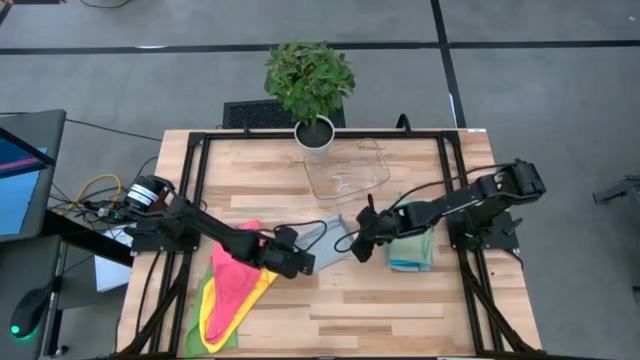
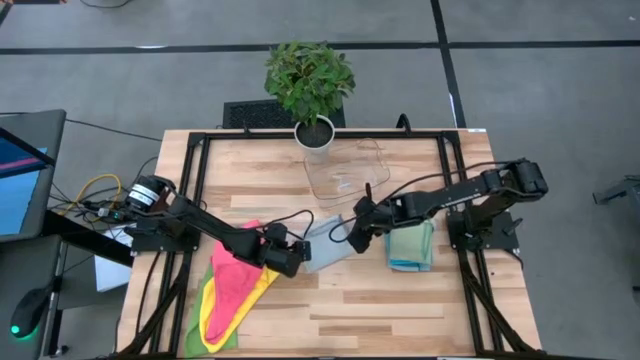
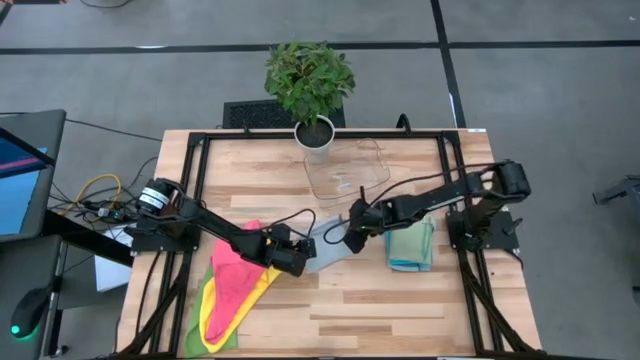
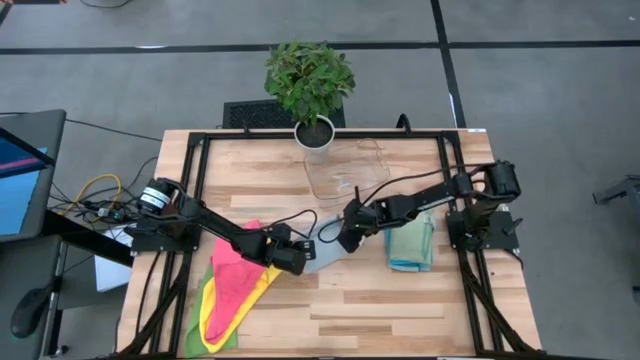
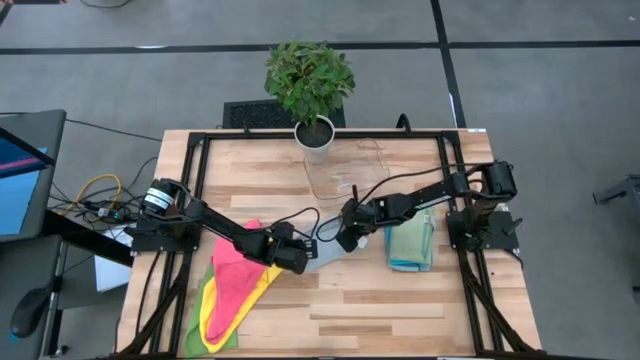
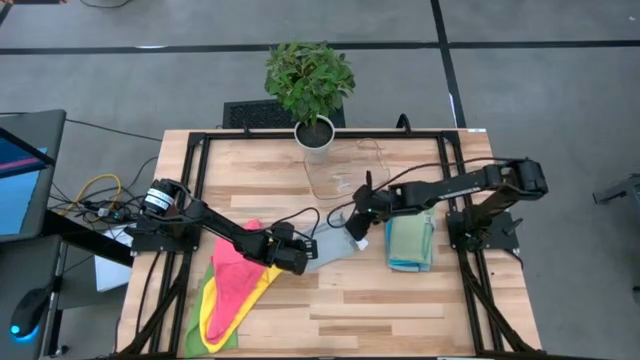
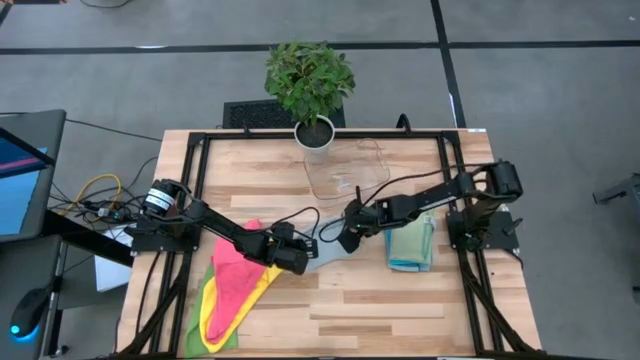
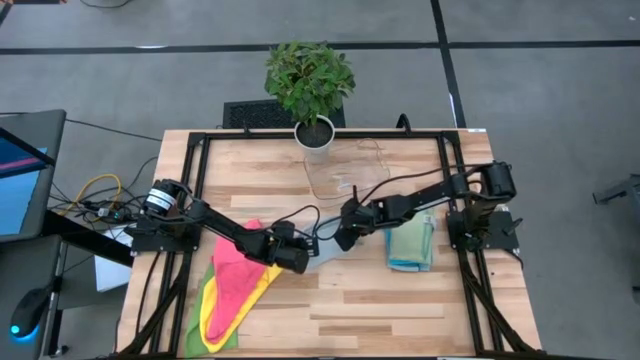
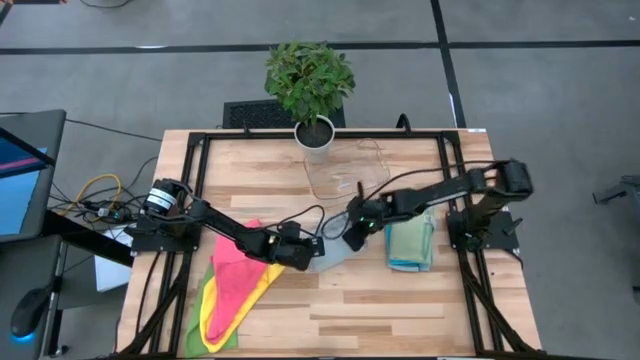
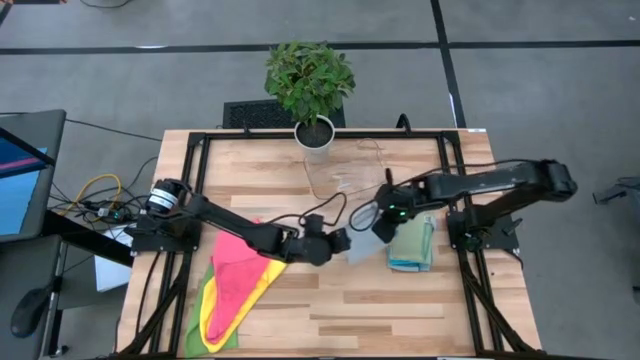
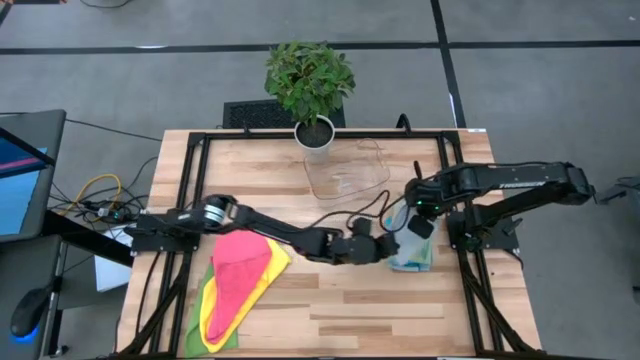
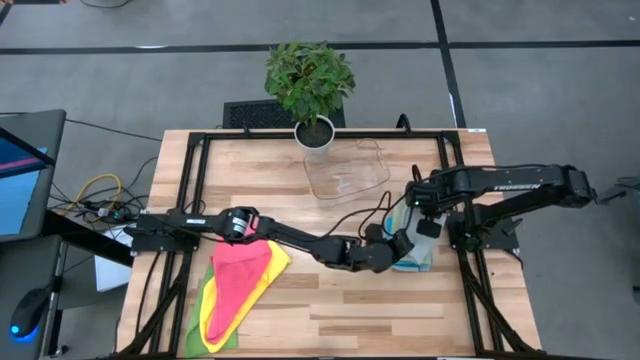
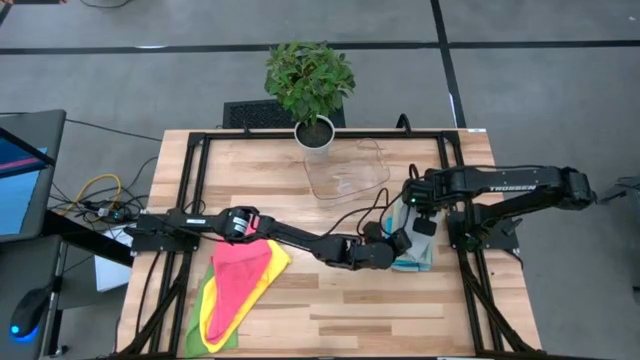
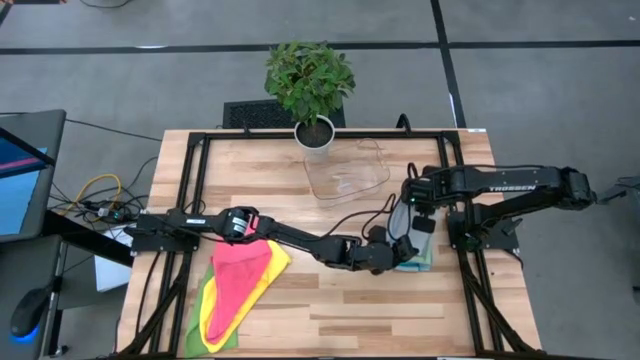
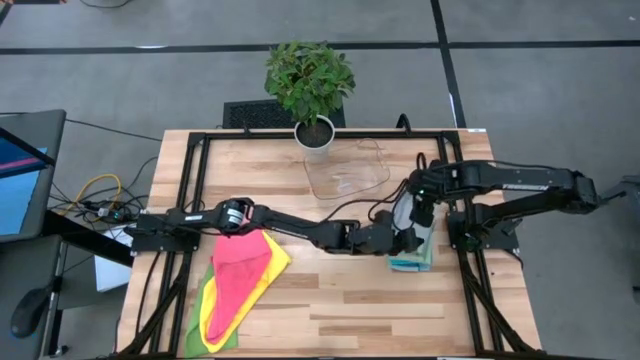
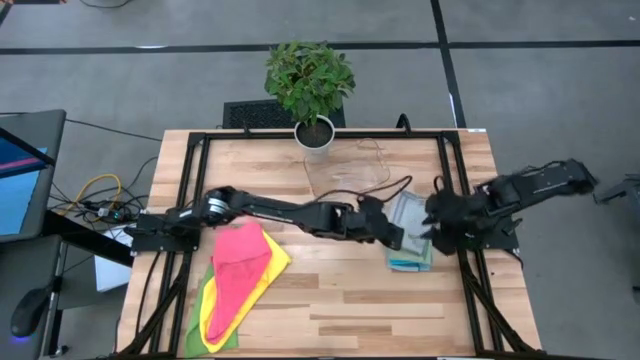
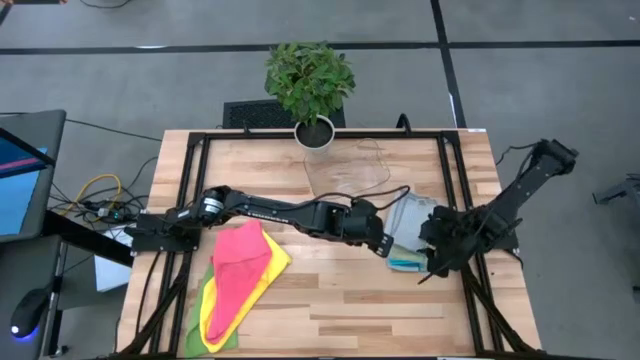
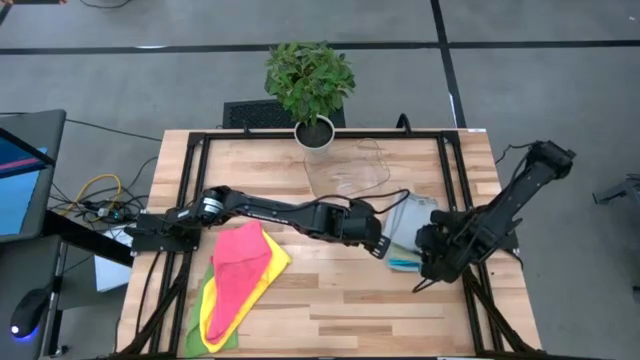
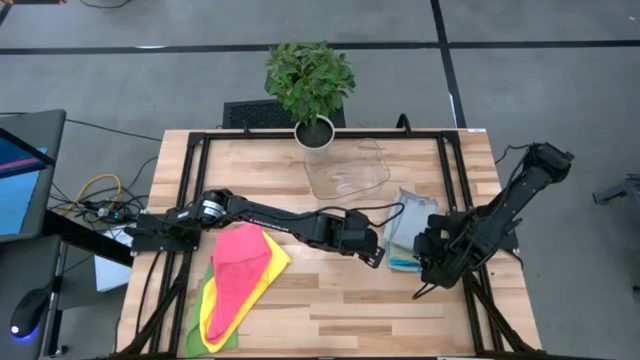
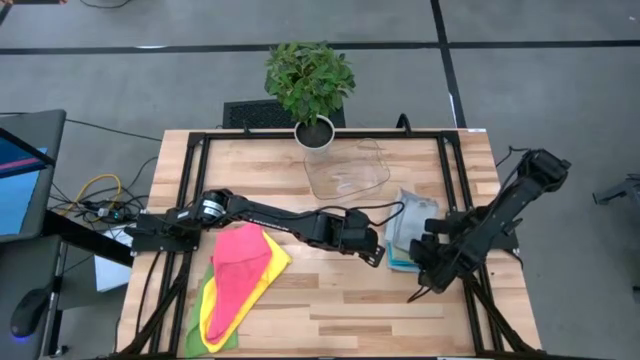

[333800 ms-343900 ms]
Task: Fold microfiber towels
Stack the gray microfiber cloth on top of the light green microfiber cloth

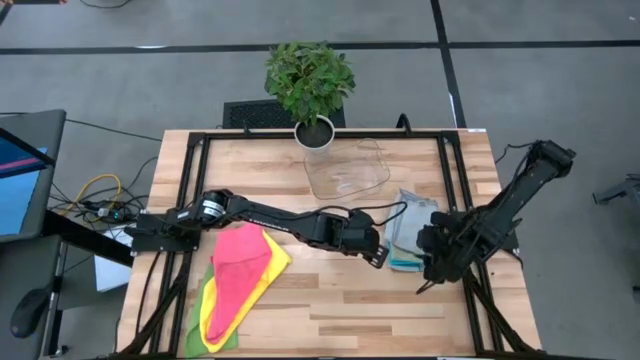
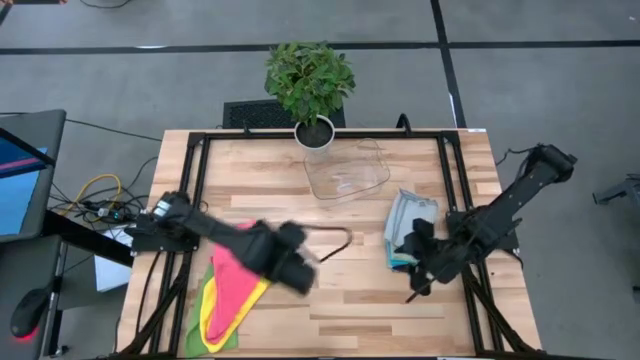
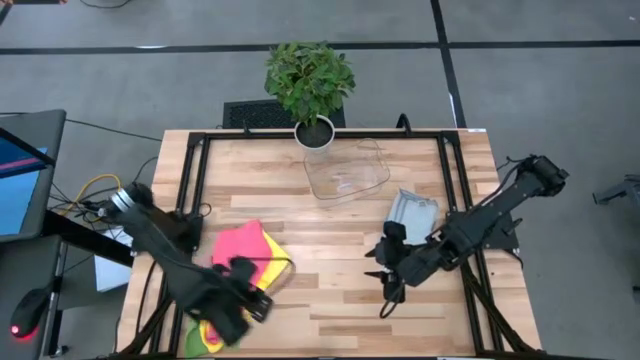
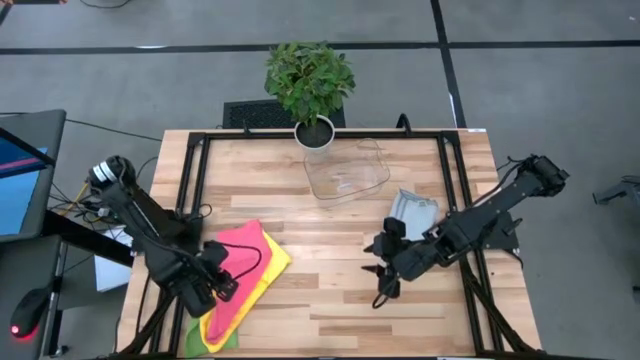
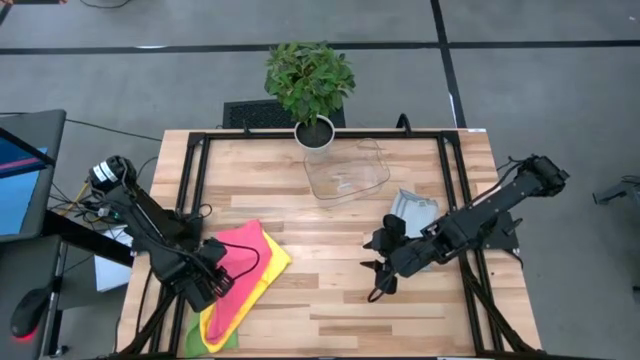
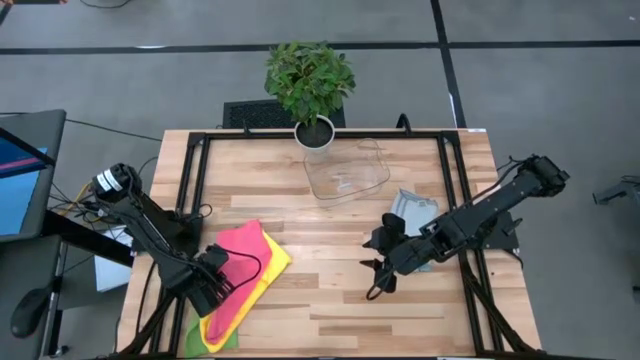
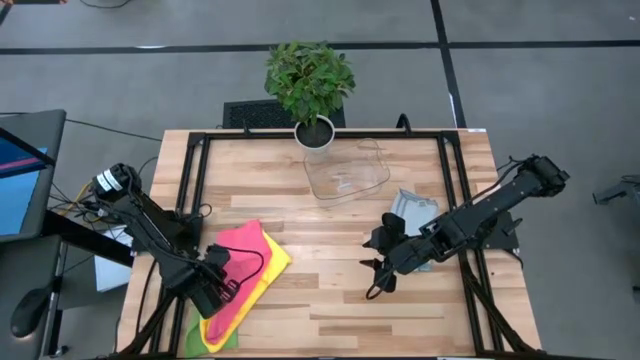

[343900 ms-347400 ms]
Fold the pink microfiber cloth
